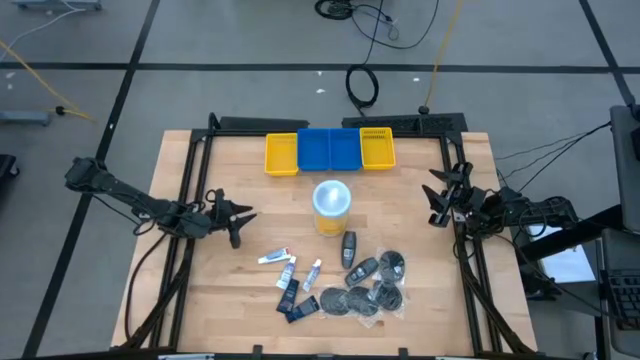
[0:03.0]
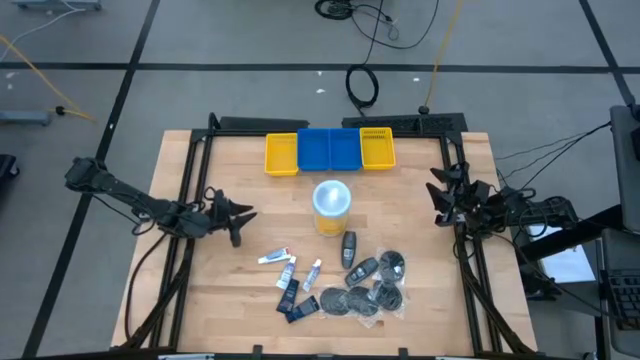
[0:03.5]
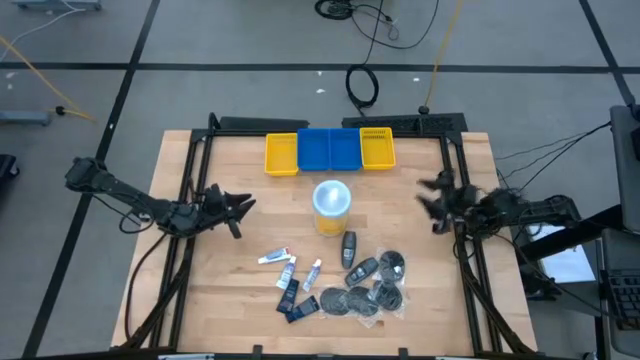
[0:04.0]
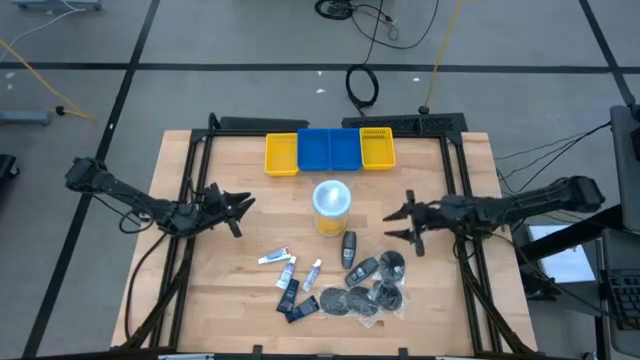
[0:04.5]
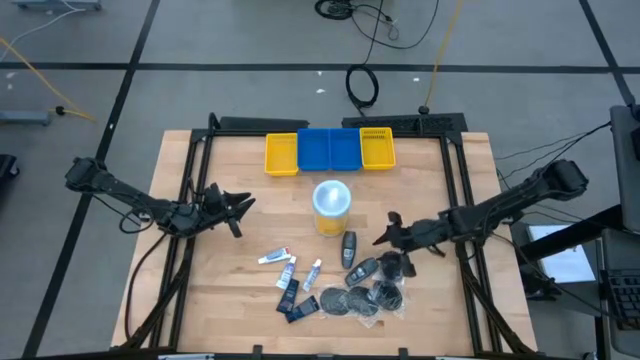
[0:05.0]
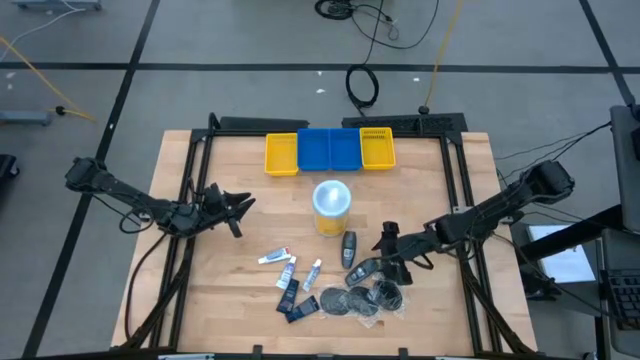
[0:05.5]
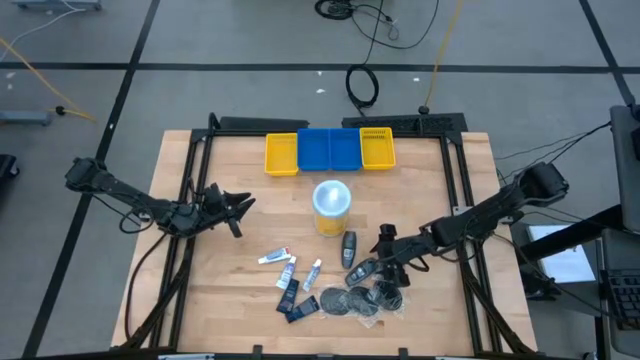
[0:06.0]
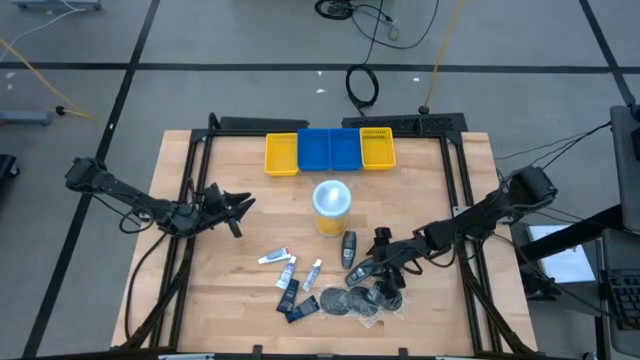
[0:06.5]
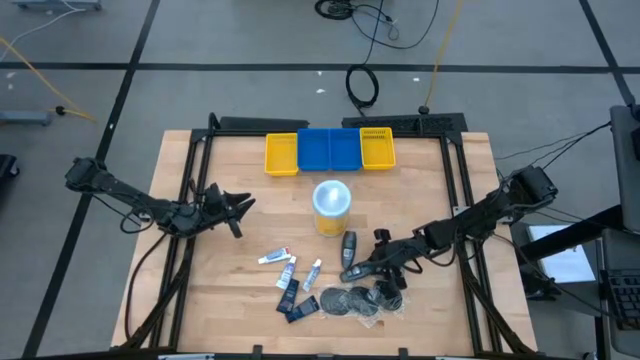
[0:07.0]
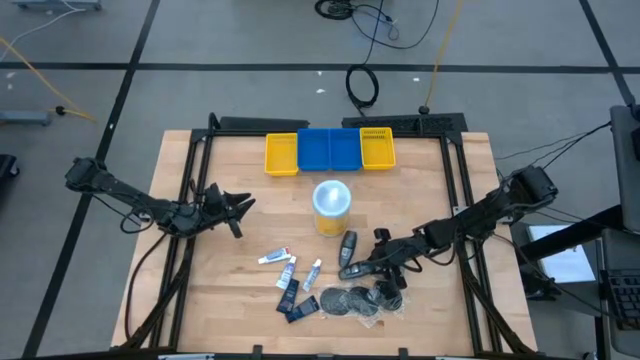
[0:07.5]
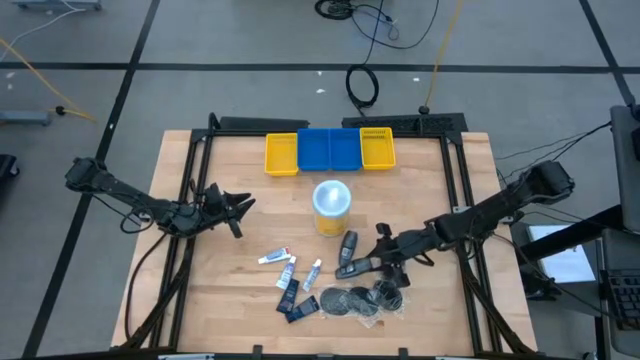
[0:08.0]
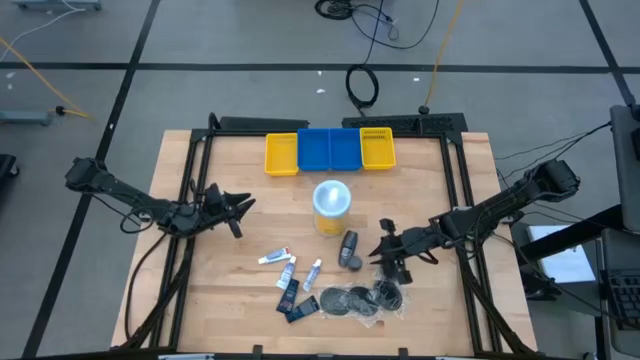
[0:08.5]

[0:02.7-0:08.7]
Task: Pick & Place Travel size toiletries
Put the deodorant into the right blue basket

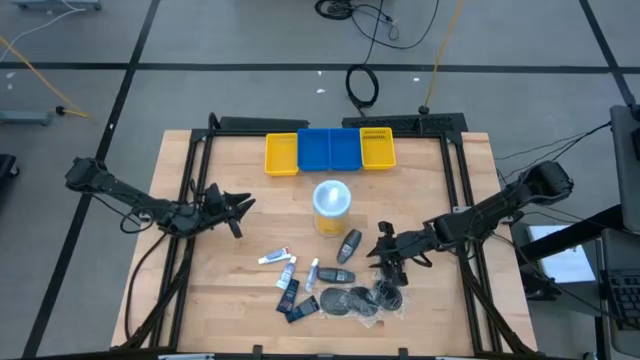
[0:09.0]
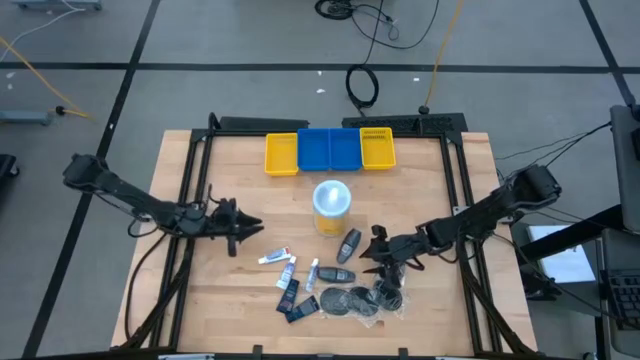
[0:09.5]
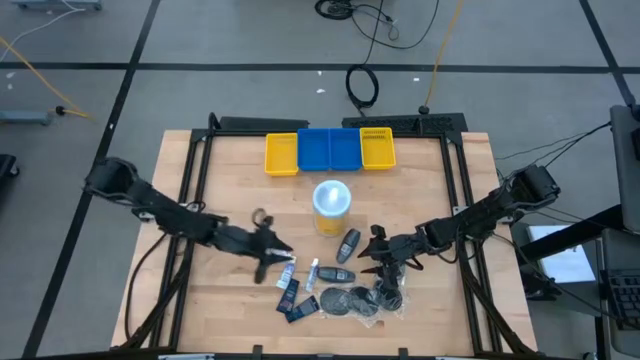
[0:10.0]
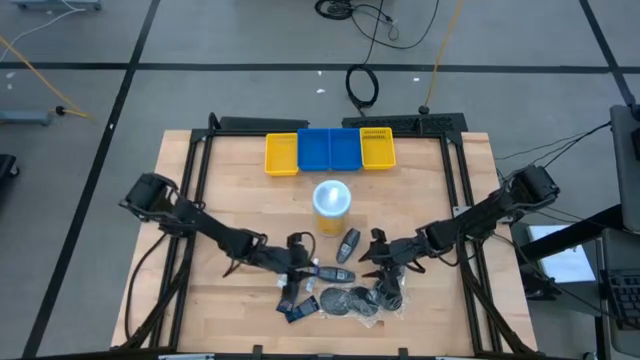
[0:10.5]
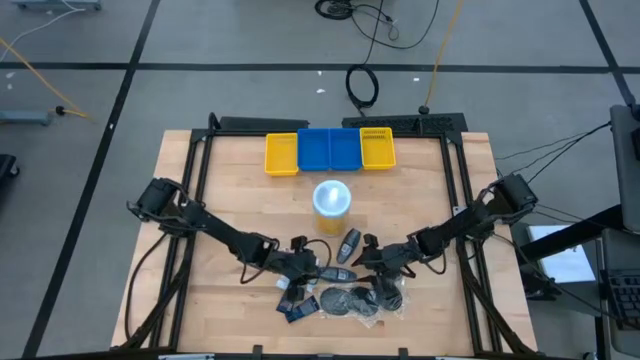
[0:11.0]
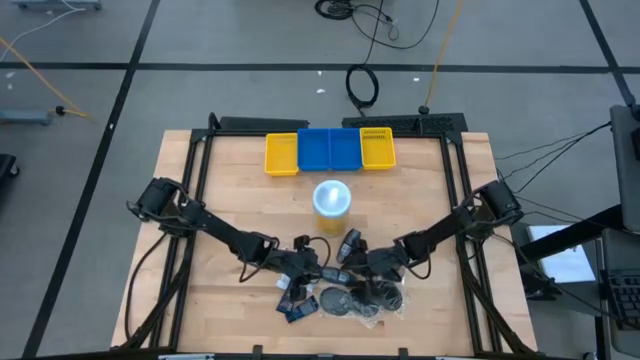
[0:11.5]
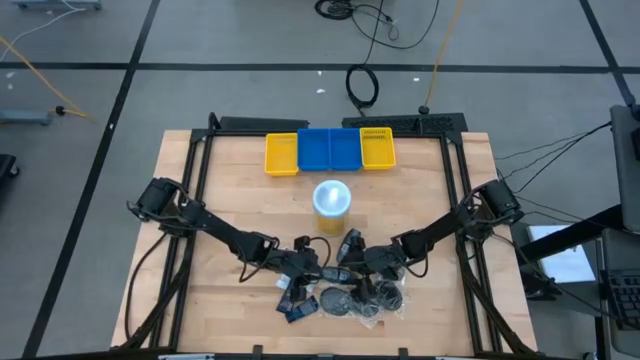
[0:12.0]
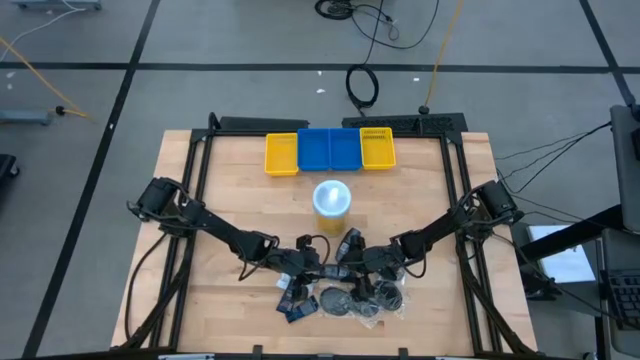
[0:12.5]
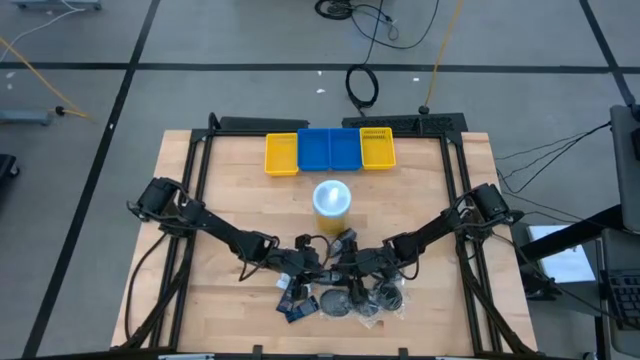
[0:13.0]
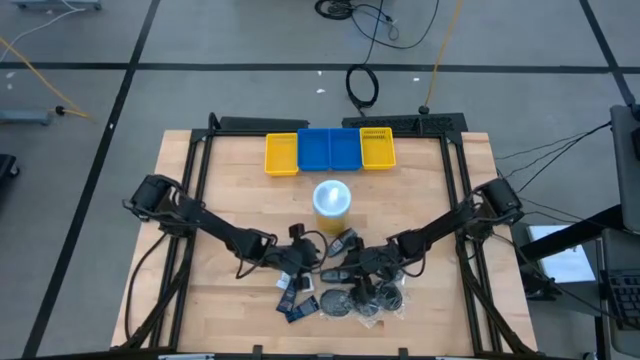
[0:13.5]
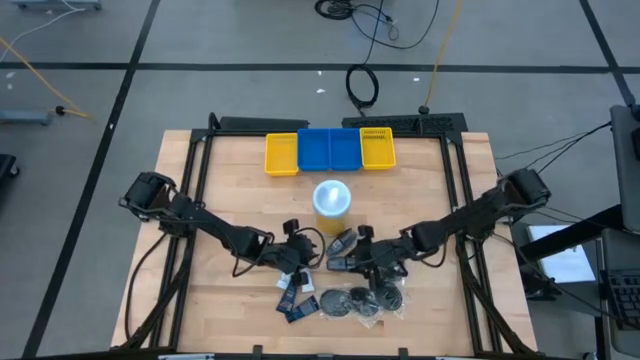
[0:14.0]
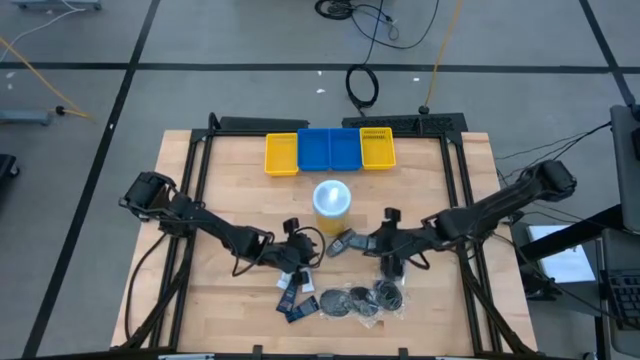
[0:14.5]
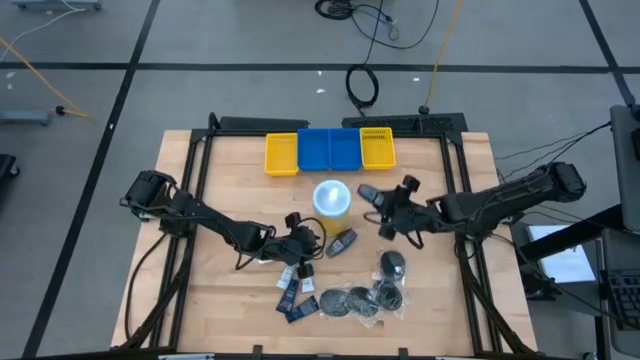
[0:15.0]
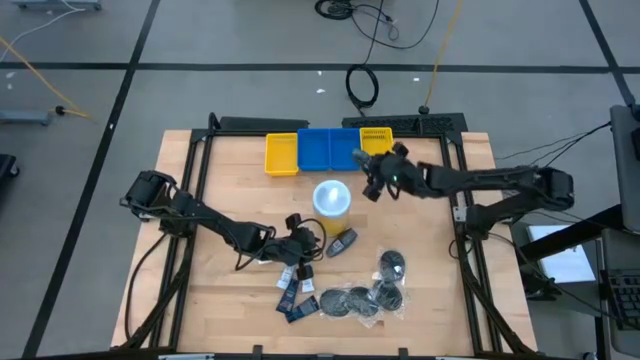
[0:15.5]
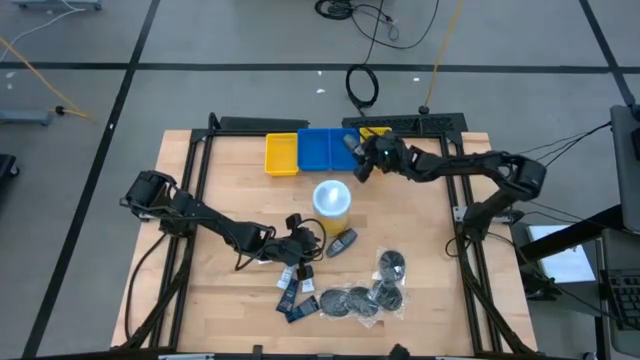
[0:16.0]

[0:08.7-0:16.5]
Put the deodorant into the right blue basket

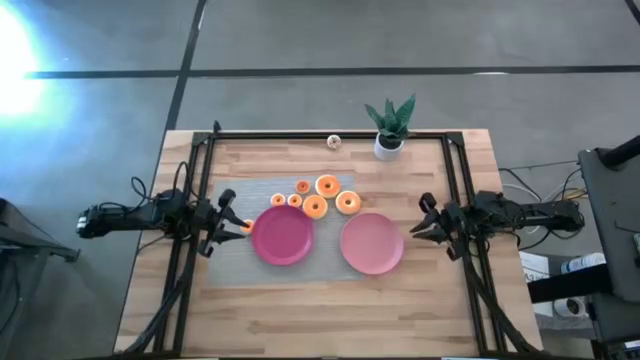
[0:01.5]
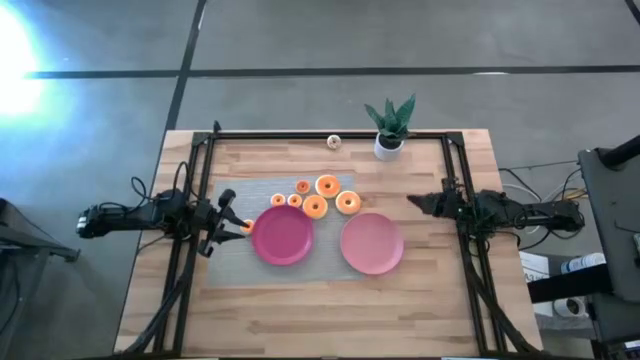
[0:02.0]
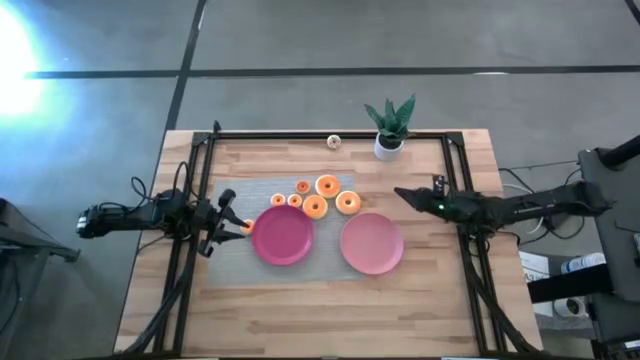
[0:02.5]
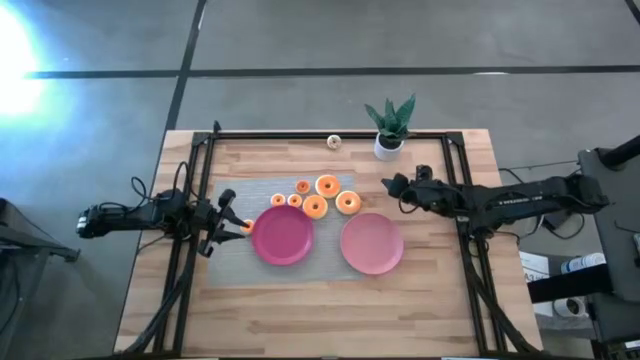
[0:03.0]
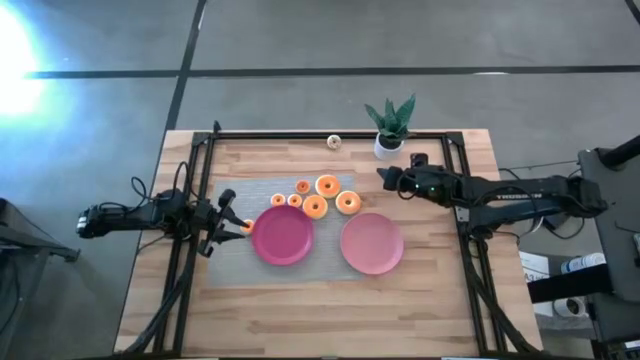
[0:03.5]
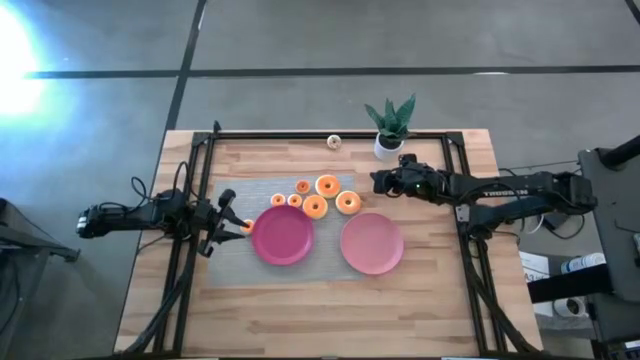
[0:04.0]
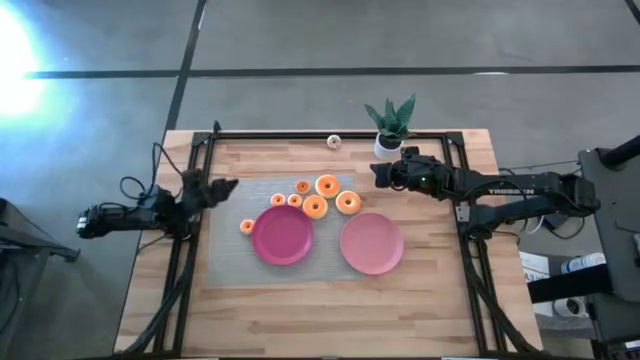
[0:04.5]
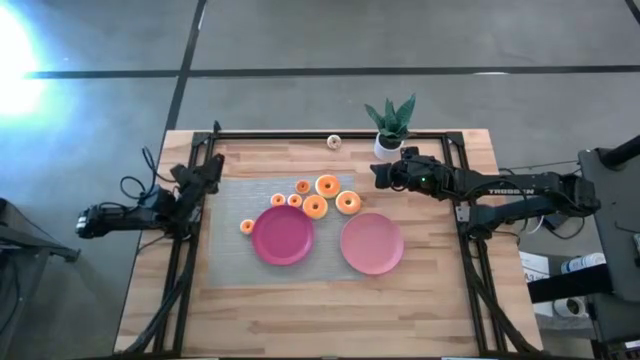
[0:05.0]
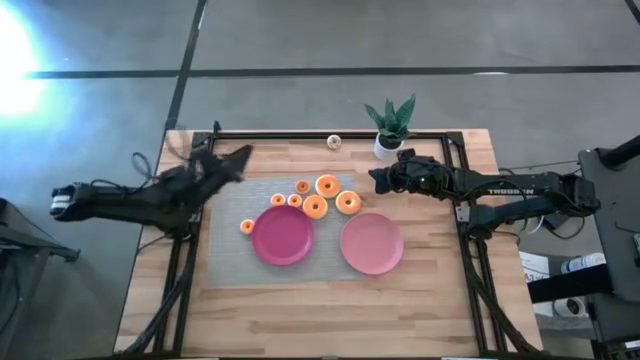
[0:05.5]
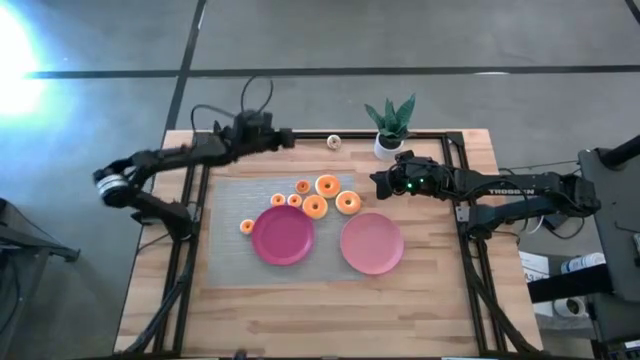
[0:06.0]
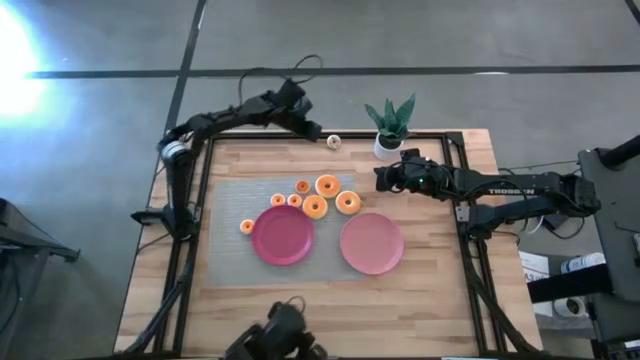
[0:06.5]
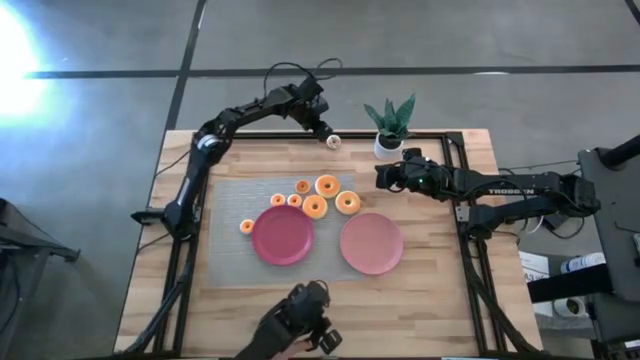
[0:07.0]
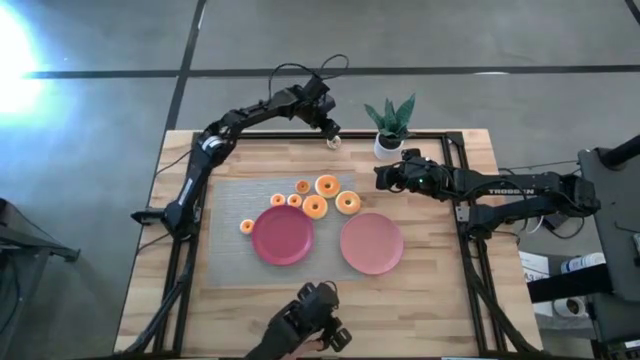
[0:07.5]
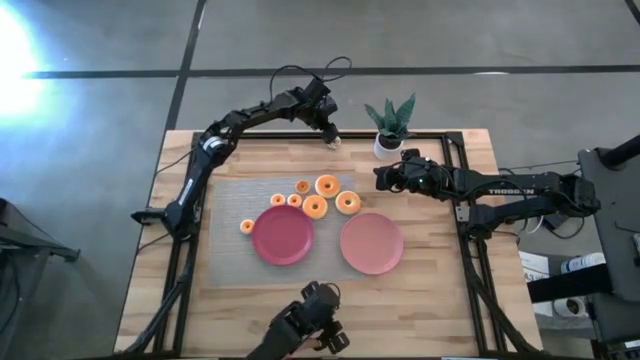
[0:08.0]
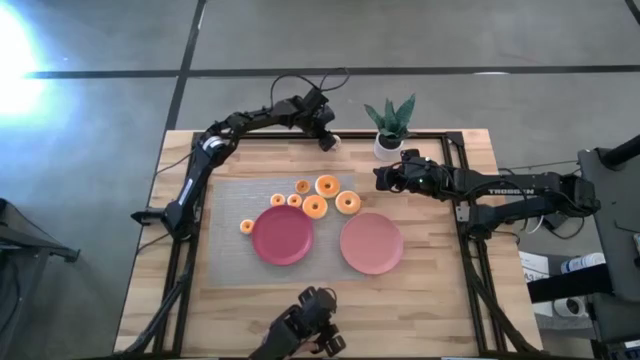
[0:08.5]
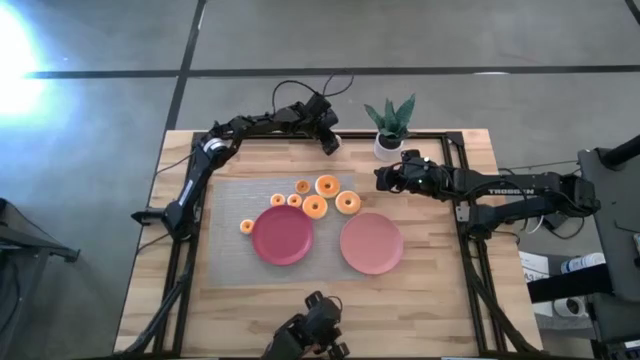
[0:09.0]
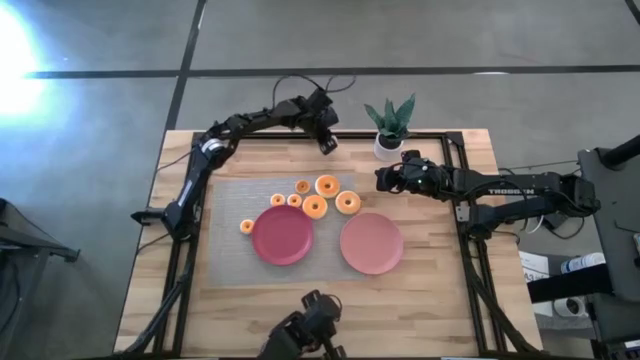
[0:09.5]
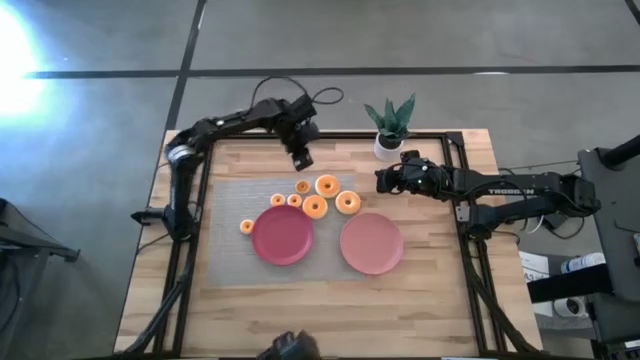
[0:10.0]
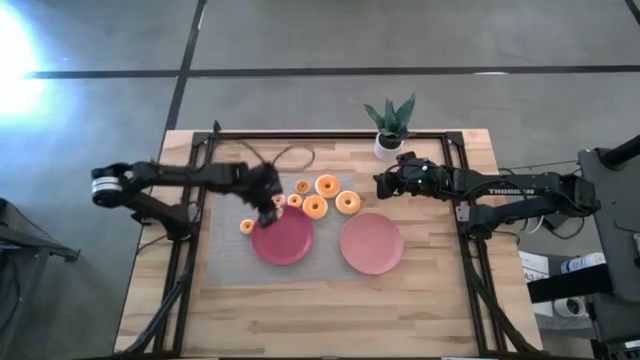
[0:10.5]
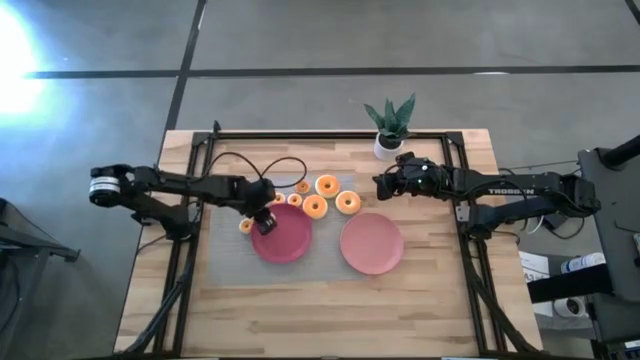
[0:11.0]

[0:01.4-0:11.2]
Task: Pick & Place donuts
Put the small white donut on the dark pink plate
